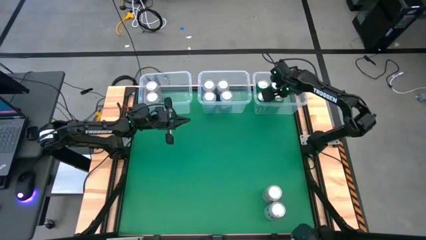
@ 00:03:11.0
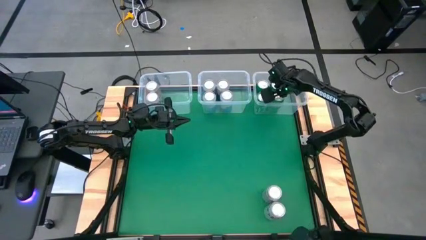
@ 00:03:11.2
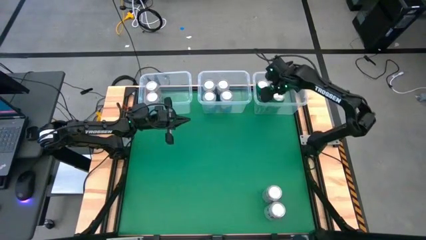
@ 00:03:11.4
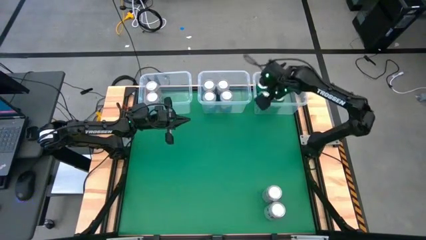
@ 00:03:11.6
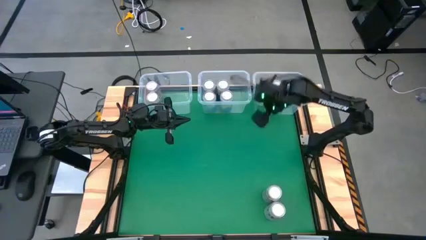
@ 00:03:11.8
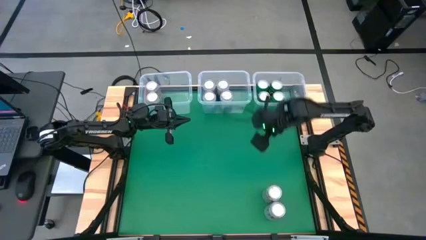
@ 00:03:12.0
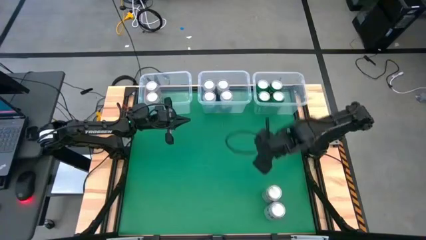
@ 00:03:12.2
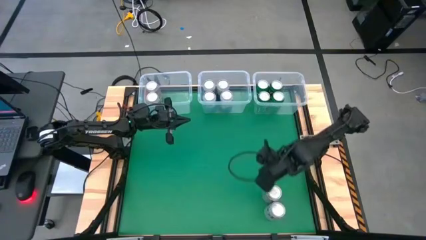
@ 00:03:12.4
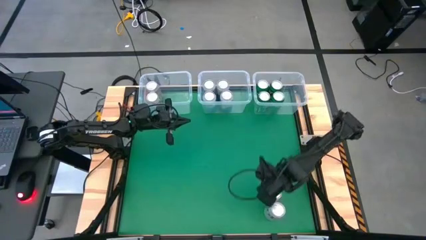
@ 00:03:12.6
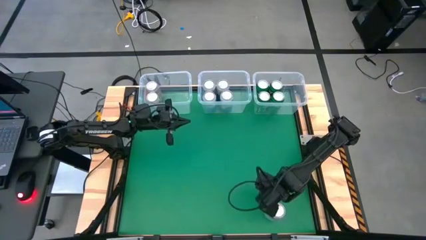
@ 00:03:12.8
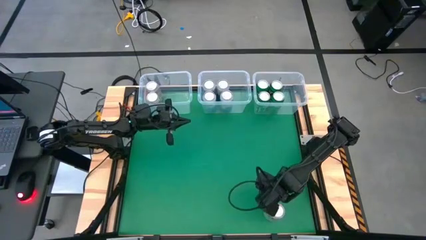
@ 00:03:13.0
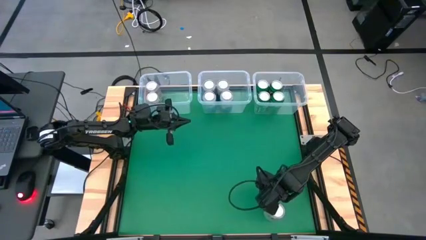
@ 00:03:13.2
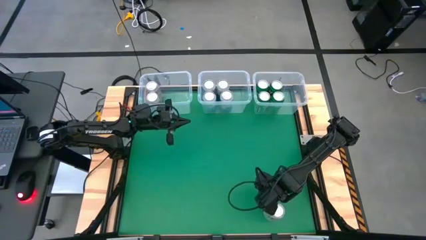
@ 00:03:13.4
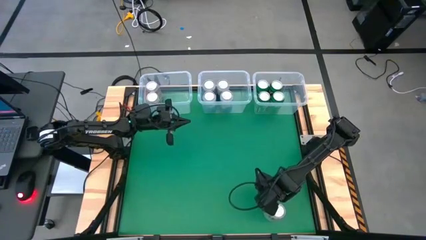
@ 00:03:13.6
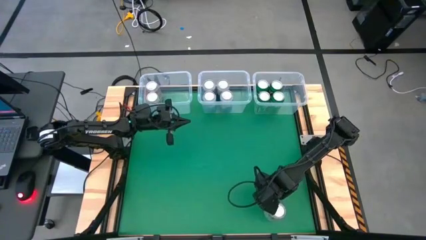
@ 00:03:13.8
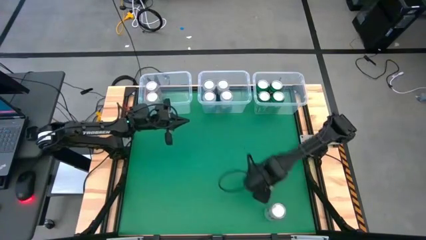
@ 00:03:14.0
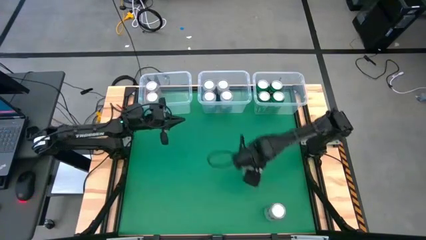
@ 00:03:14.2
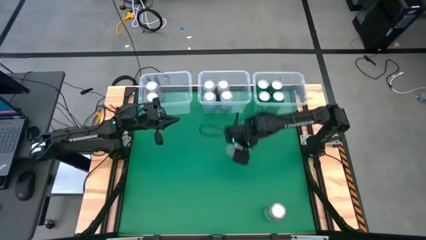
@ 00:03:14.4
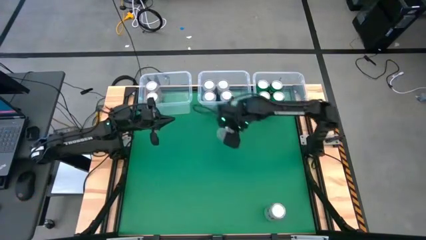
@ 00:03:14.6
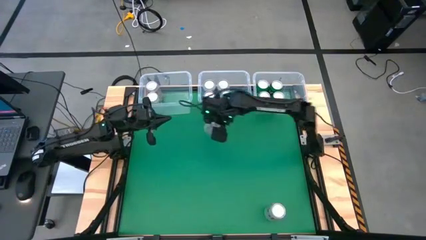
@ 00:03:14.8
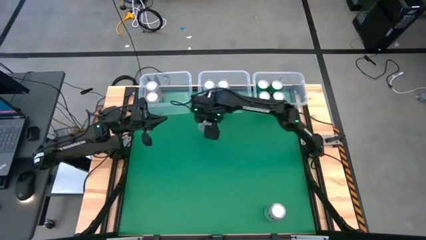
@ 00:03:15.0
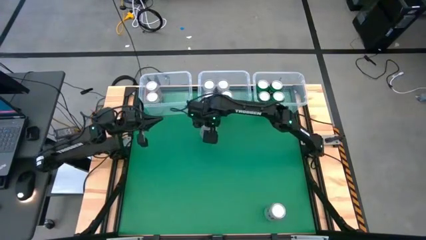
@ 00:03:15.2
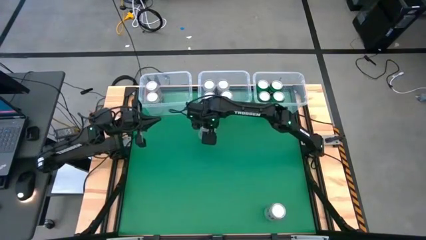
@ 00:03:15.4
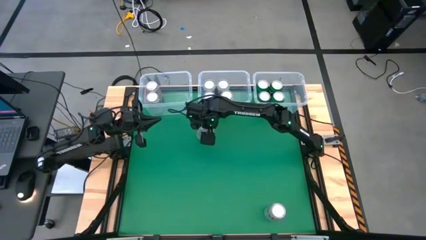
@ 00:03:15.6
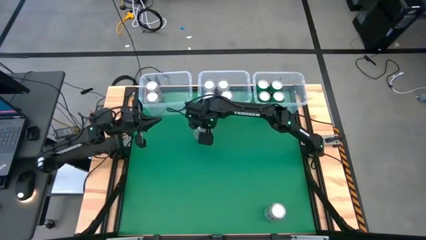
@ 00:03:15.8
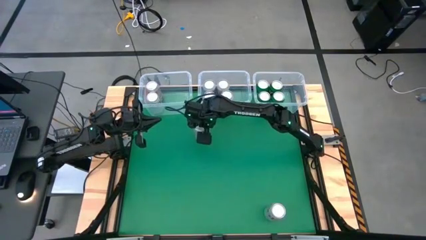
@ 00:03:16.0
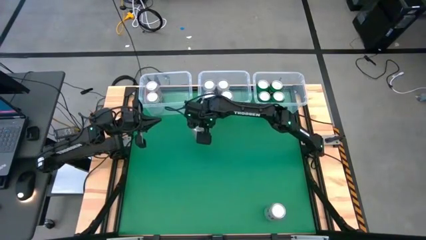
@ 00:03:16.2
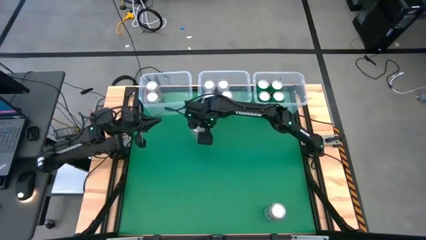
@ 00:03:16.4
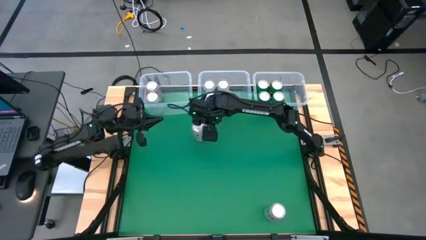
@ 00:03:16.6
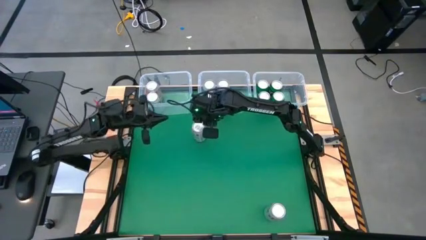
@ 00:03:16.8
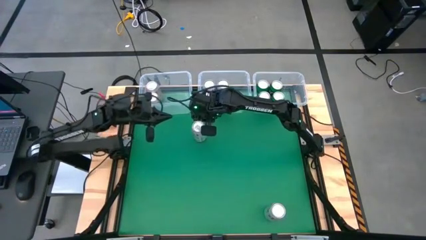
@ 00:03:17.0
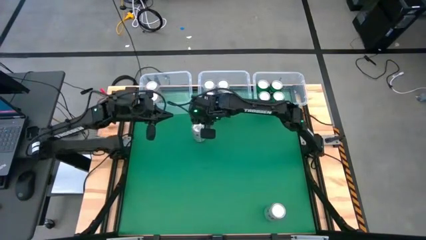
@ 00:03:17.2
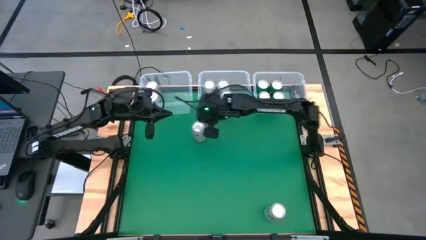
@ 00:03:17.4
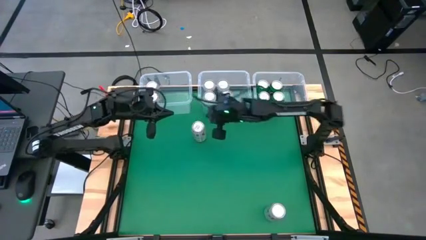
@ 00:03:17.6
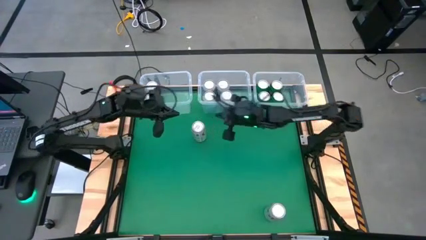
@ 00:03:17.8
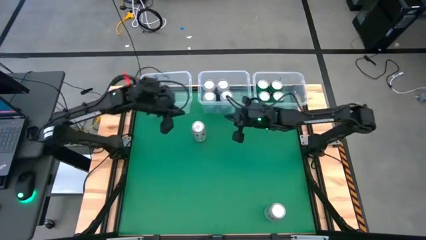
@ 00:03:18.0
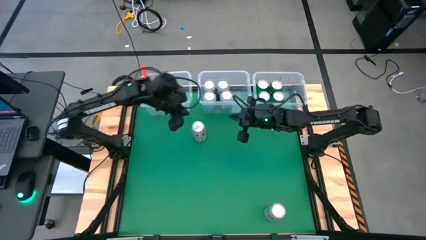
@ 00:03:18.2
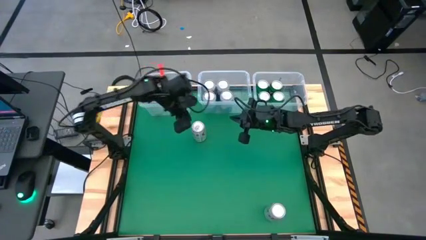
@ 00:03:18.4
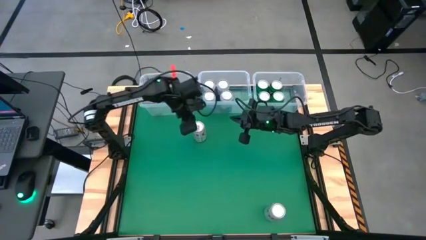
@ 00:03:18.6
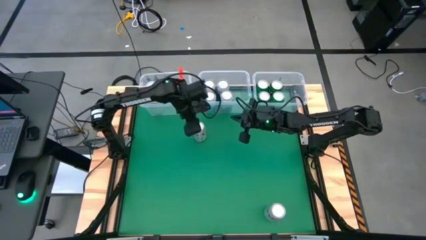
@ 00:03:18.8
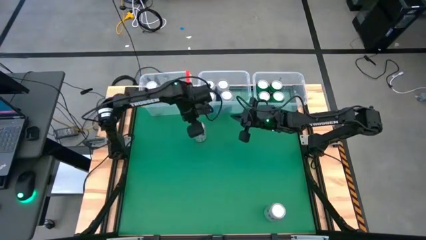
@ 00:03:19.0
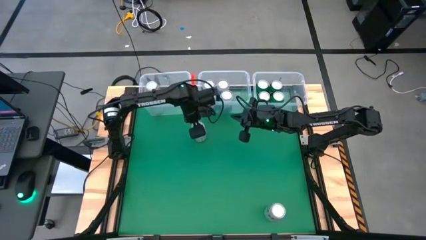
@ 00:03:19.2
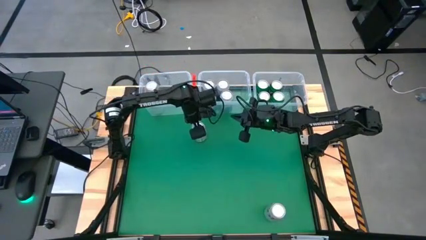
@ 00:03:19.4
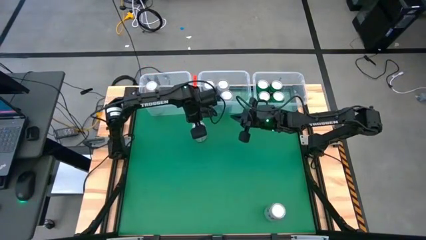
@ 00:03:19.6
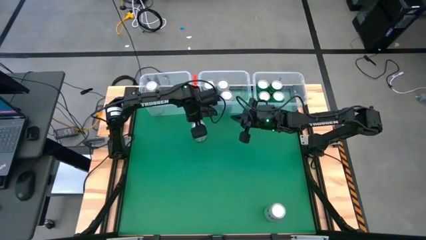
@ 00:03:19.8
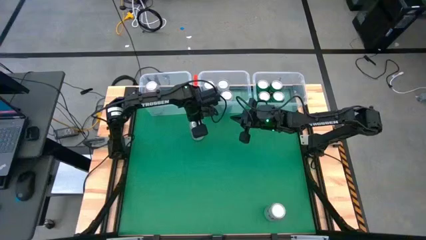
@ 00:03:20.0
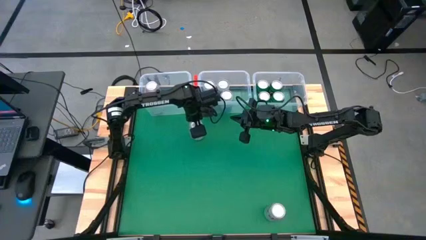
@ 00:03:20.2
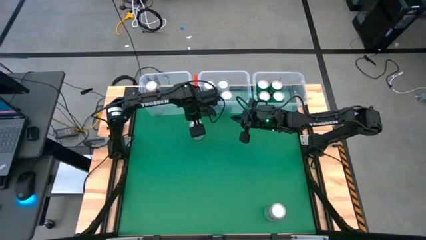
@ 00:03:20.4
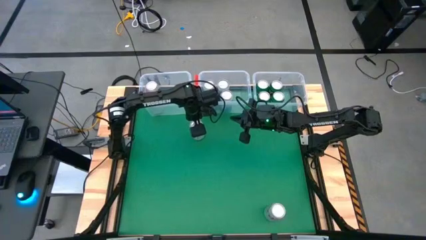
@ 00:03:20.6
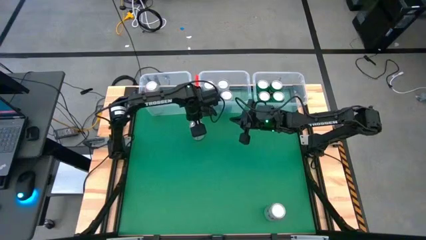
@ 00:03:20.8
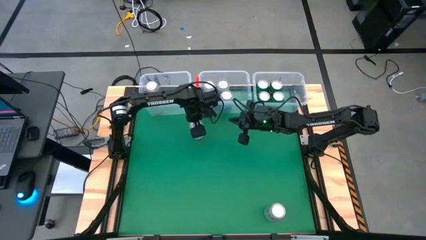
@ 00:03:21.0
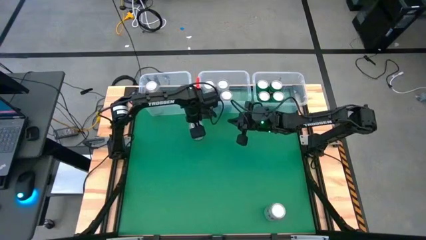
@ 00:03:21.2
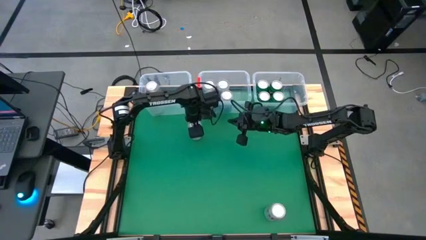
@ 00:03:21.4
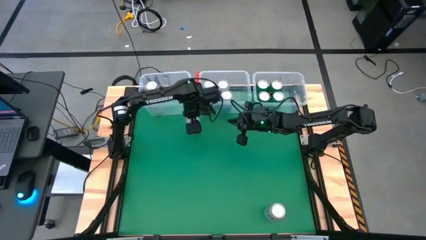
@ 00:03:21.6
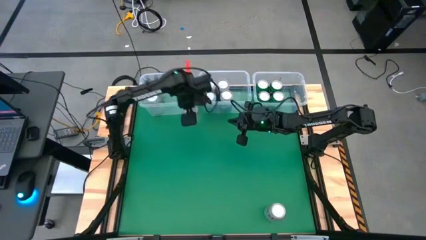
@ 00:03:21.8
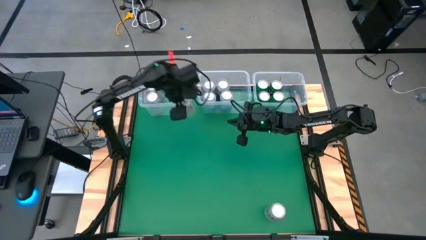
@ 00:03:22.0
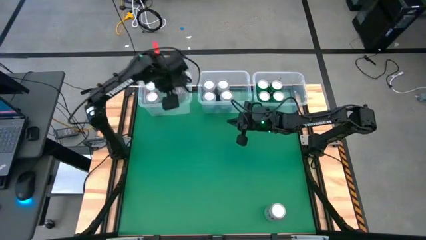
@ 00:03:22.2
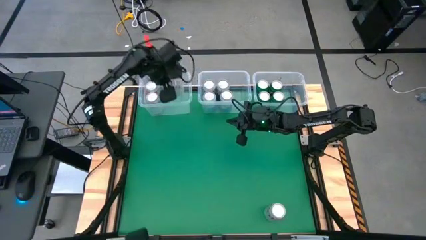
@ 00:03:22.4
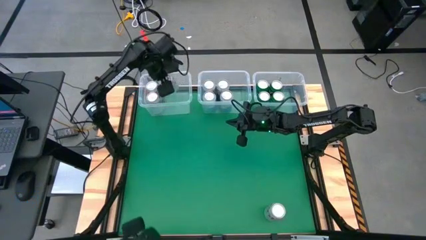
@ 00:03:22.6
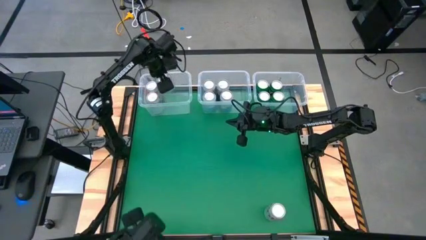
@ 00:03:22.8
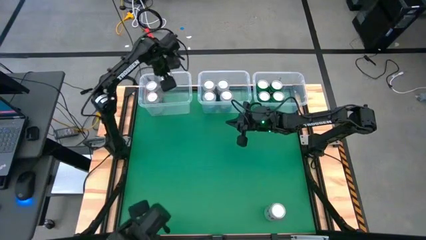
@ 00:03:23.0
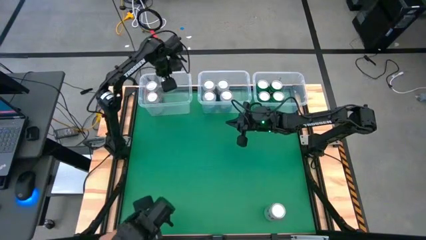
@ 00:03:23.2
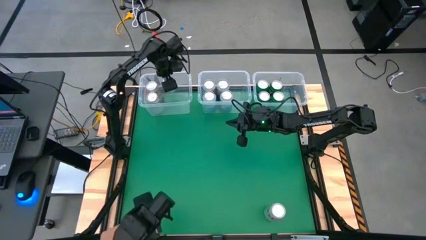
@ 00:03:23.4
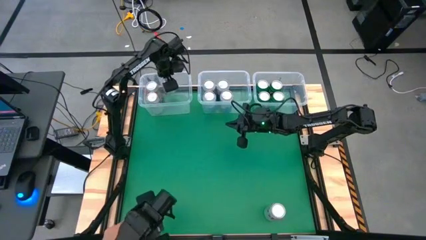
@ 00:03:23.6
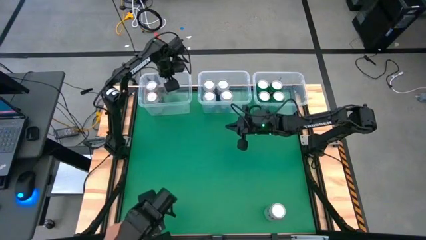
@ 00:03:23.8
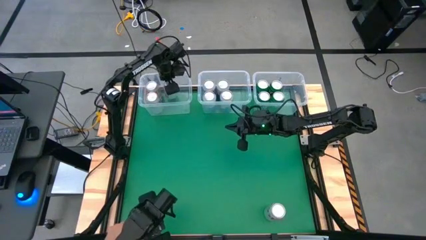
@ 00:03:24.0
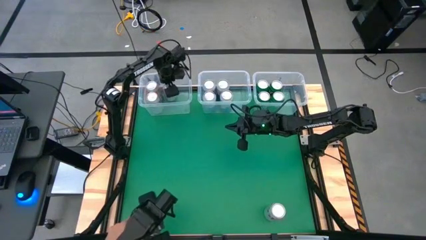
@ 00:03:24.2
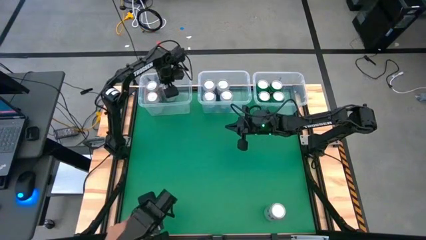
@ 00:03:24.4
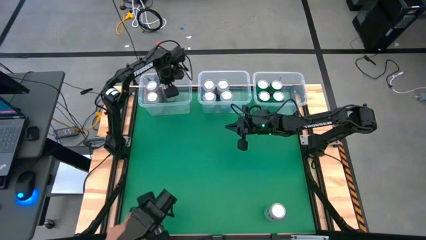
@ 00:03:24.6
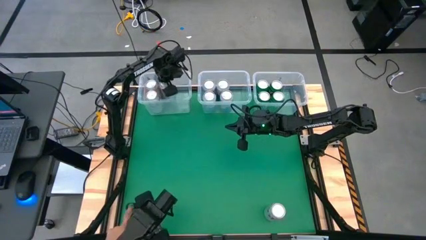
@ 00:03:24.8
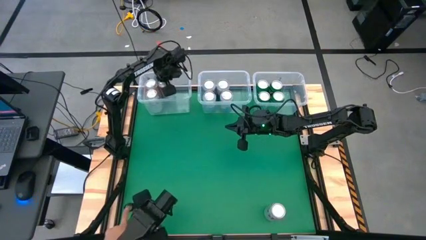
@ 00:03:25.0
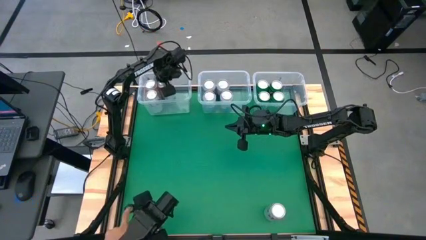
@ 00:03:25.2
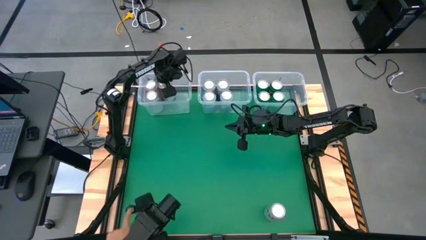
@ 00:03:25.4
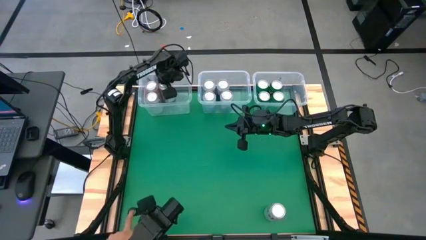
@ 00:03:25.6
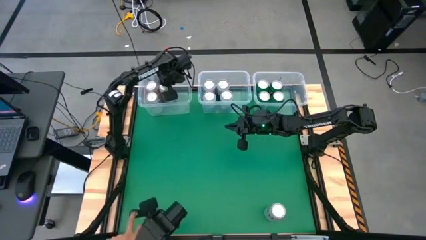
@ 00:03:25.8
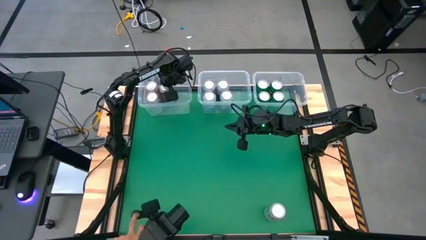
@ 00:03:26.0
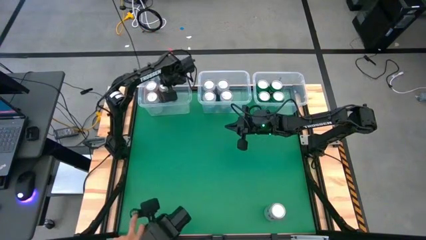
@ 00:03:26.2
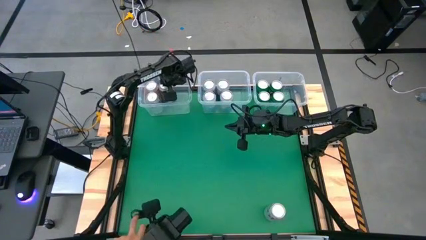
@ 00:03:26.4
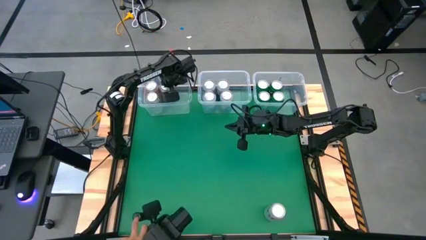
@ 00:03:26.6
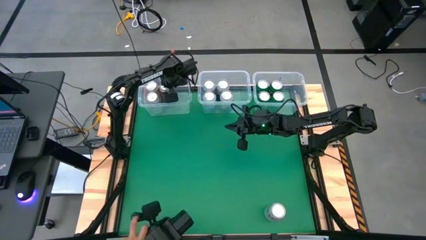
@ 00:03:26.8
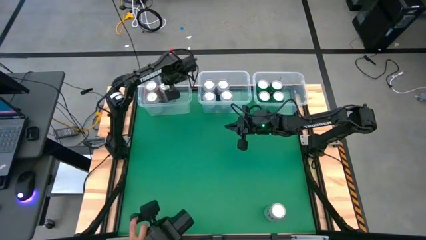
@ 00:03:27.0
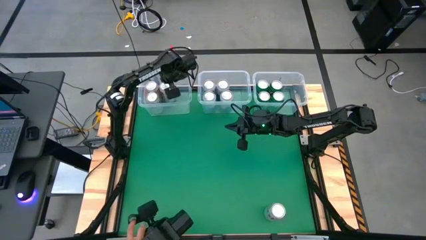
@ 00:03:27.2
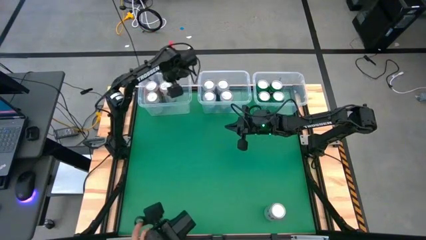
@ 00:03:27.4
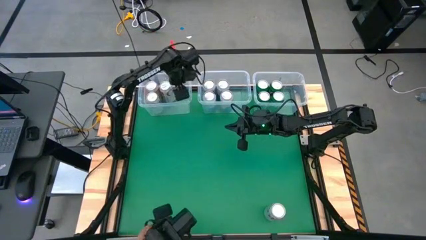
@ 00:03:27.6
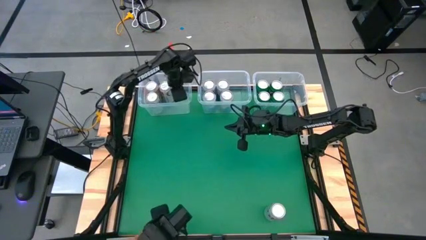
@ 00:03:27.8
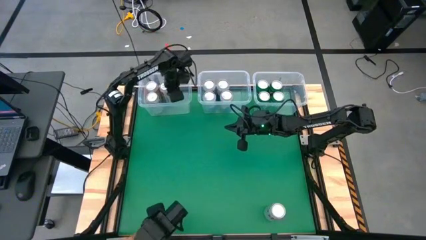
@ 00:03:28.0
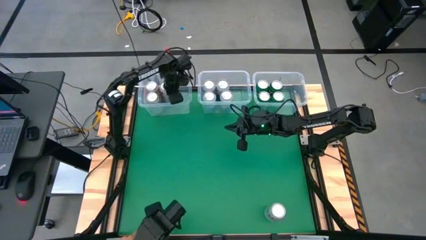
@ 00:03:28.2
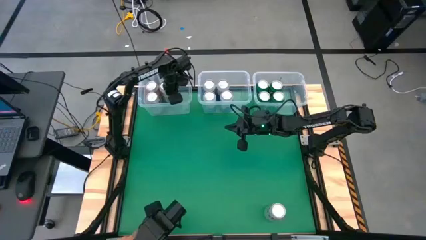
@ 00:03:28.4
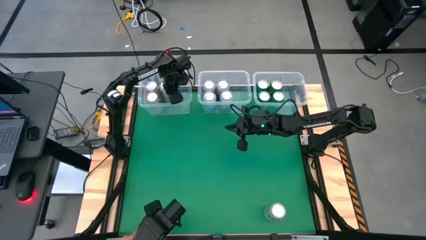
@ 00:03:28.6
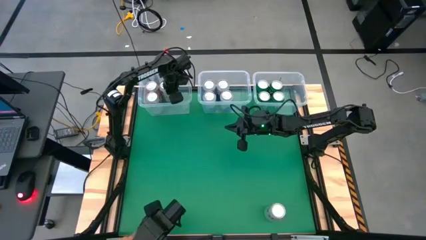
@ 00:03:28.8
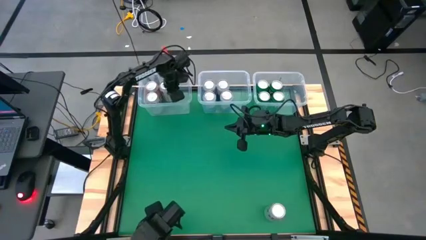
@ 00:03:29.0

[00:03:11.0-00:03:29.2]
Task: Sort soda cans
Put the top red silver soda can into the left transparent bin
